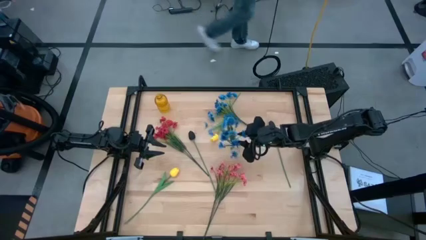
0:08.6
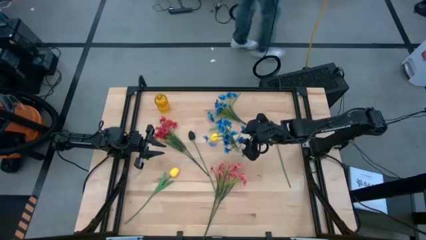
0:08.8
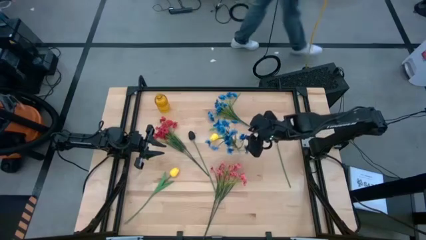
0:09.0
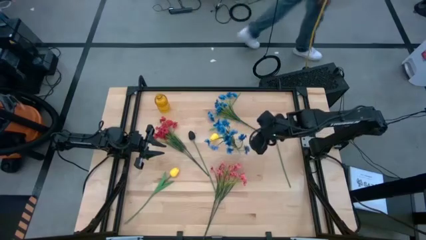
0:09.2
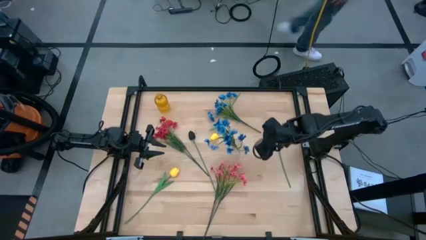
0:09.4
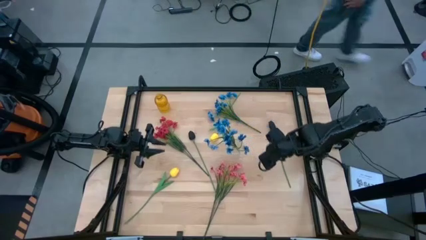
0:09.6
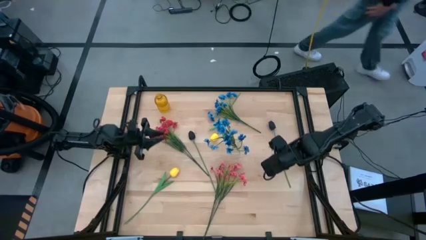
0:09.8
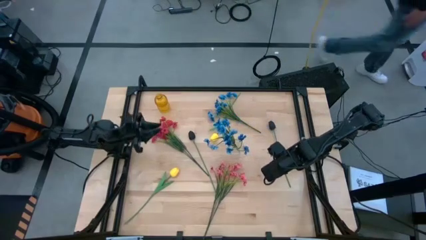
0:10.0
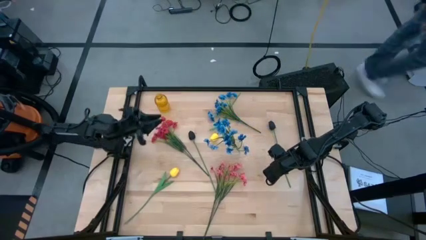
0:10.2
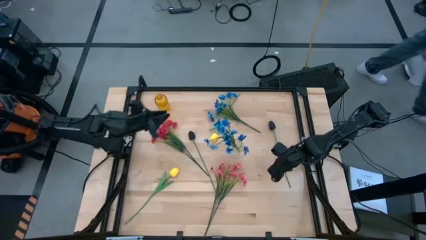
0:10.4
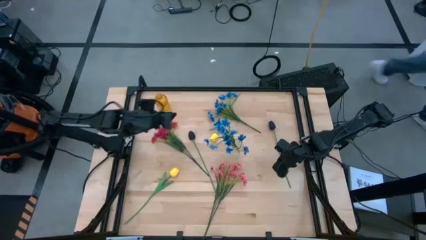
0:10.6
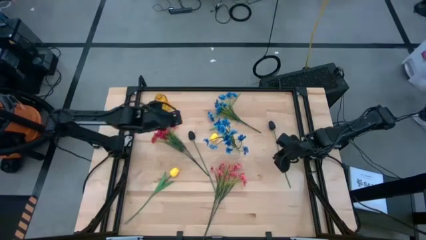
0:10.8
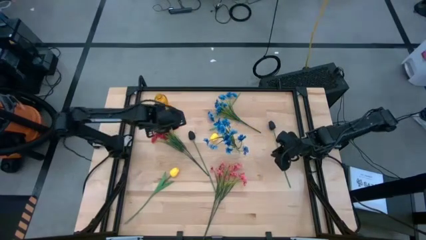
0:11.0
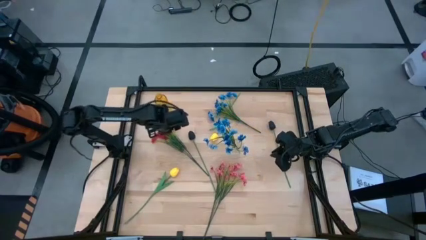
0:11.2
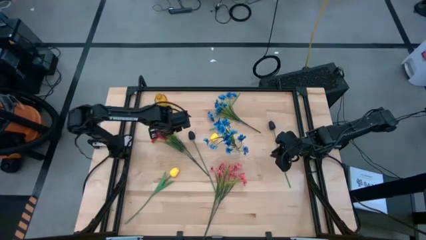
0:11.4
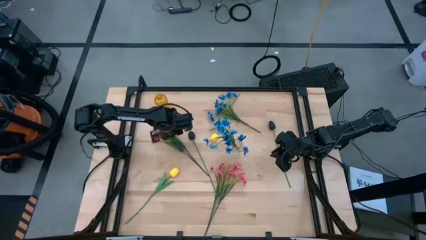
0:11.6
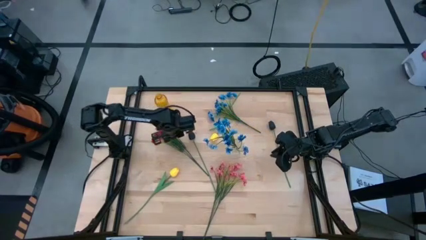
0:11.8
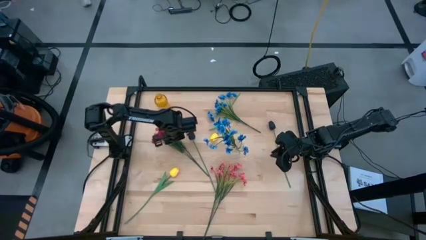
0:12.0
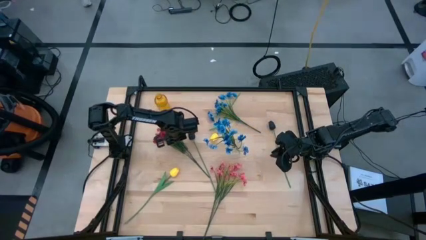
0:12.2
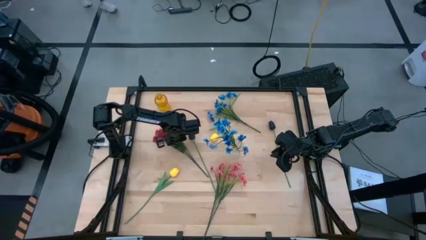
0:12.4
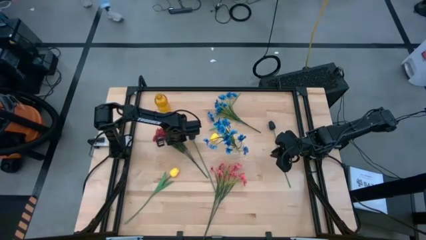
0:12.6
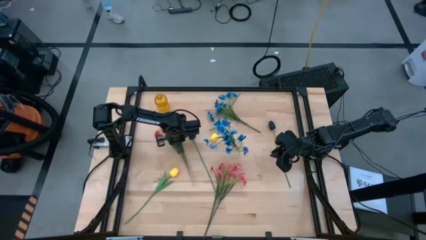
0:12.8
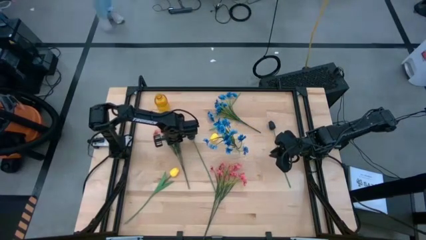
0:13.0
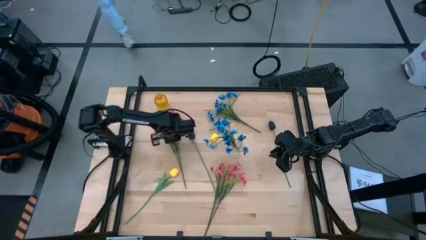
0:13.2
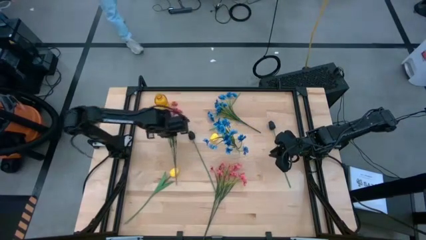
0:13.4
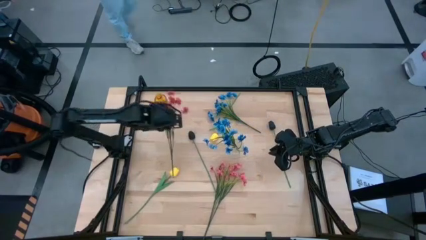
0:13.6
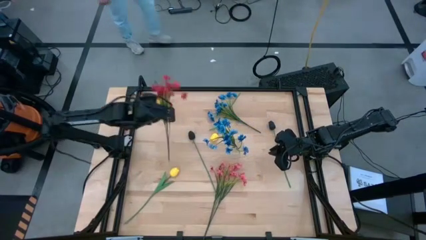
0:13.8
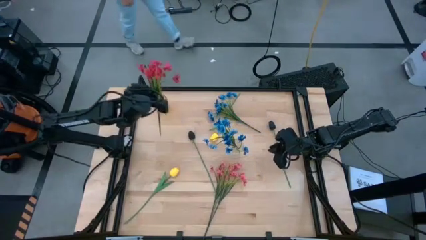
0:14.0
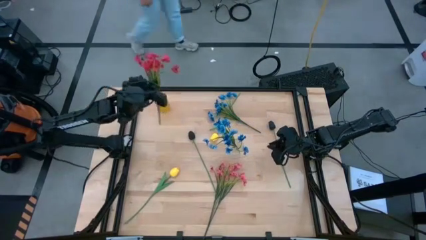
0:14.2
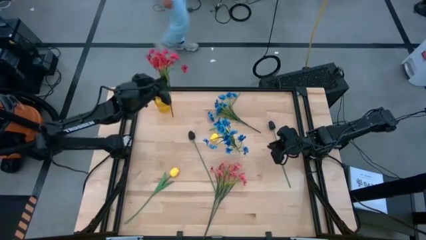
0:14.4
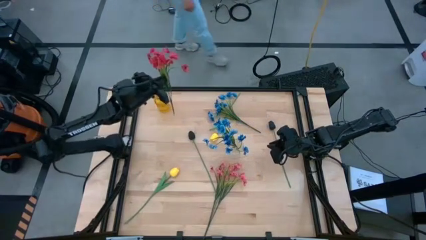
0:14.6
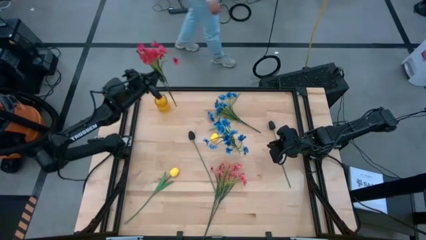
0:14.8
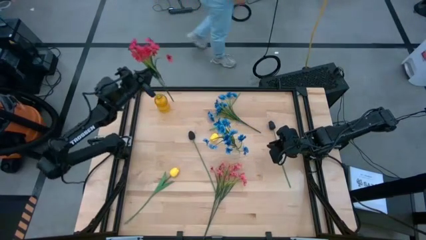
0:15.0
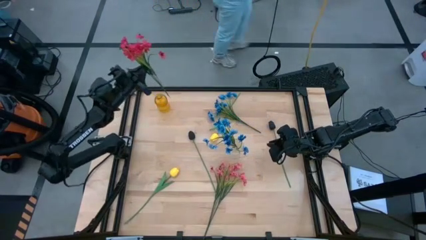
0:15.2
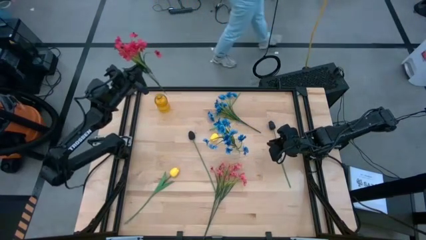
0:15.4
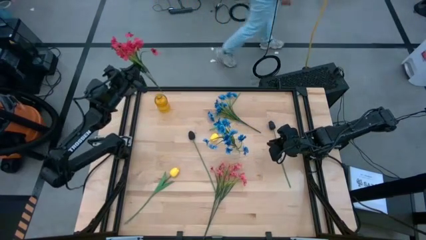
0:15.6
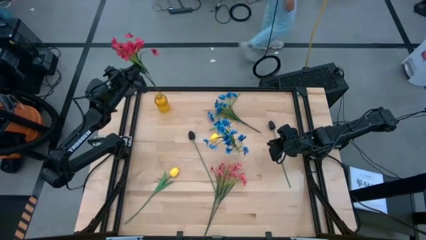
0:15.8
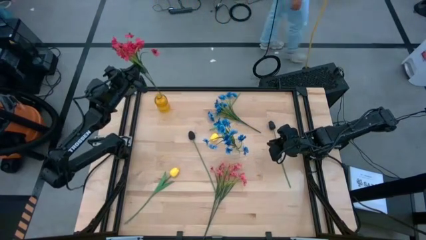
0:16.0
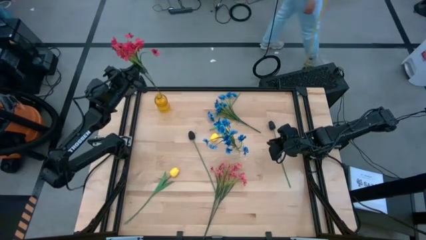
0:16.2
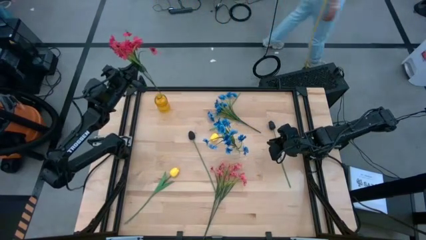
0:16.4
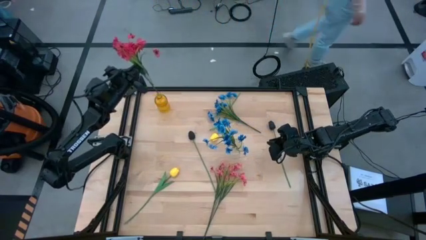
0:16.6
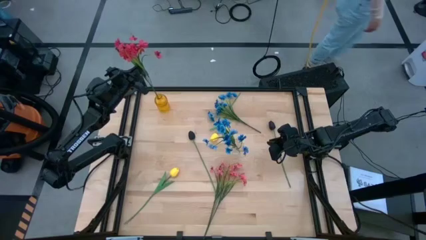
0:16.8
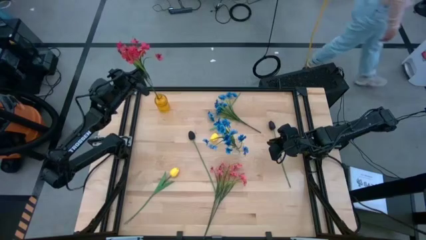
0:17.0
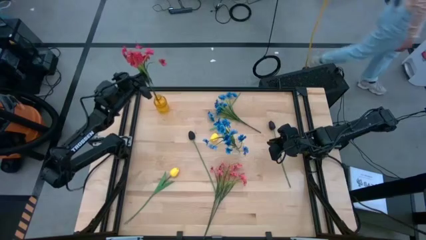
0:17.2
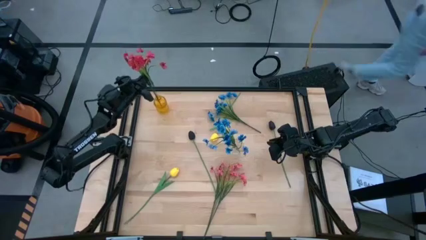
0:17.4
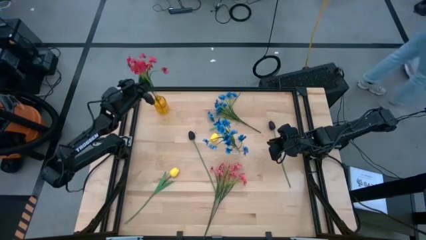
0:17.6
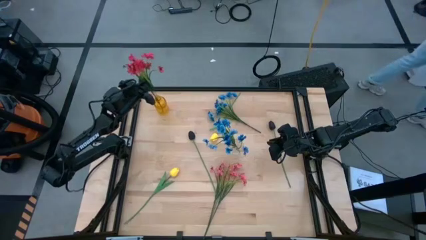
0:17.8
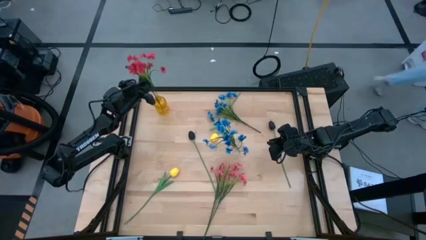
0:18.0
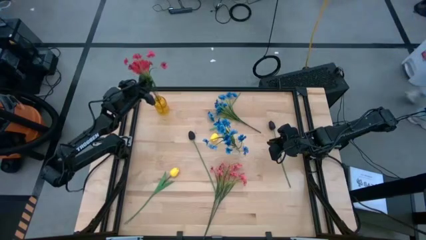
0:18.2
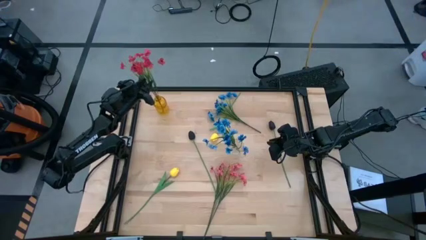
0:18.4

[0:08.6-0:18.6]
Task: Sort flowers into vase by color
Put the red flowers into the yellow vase

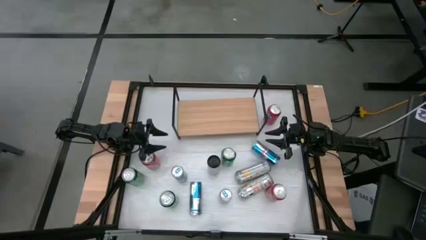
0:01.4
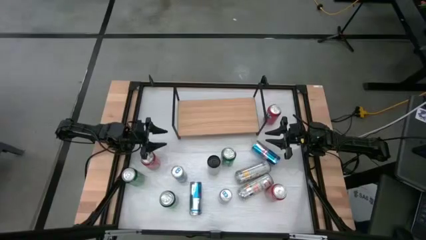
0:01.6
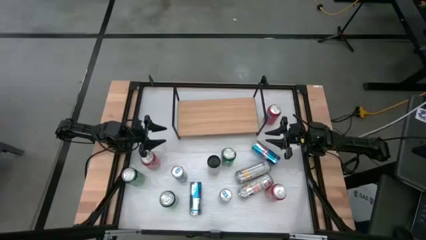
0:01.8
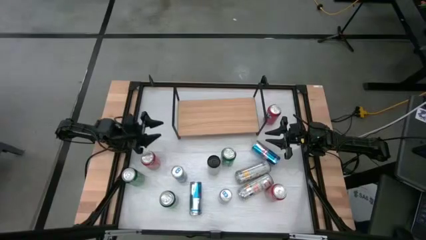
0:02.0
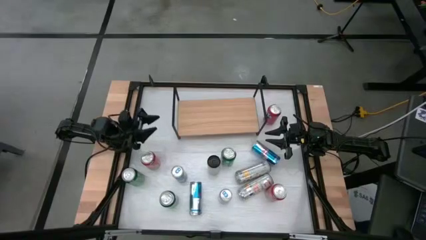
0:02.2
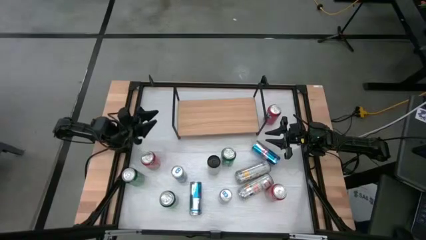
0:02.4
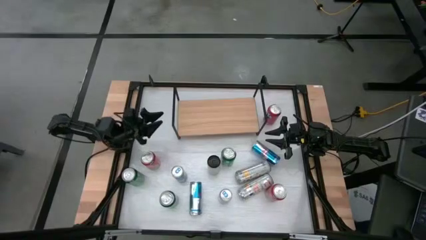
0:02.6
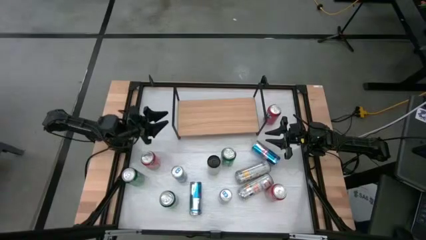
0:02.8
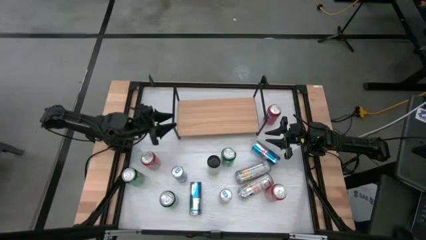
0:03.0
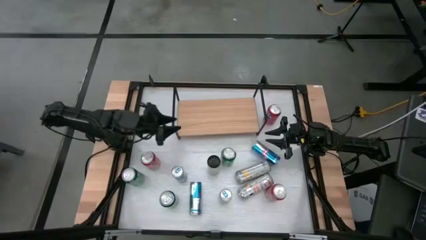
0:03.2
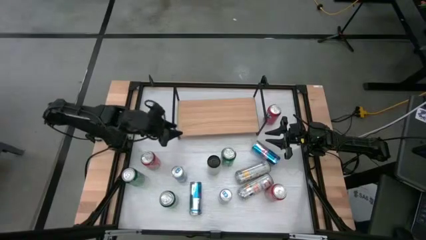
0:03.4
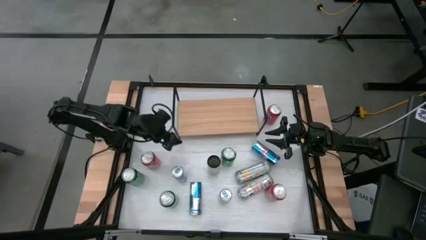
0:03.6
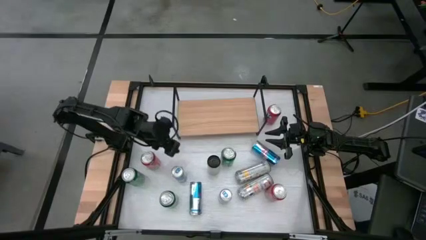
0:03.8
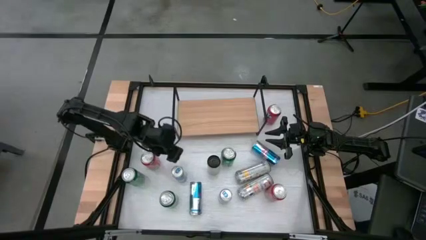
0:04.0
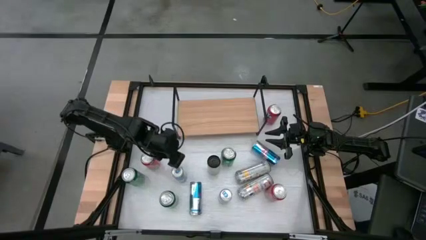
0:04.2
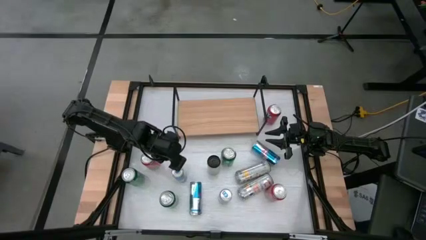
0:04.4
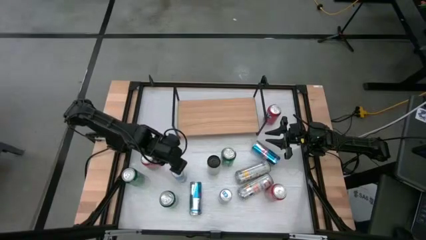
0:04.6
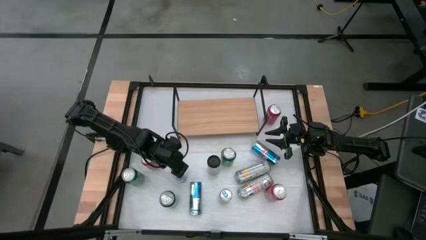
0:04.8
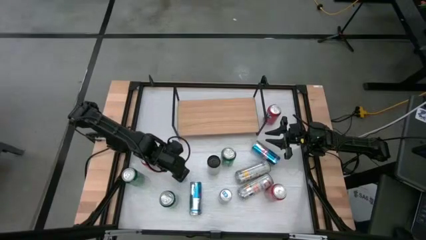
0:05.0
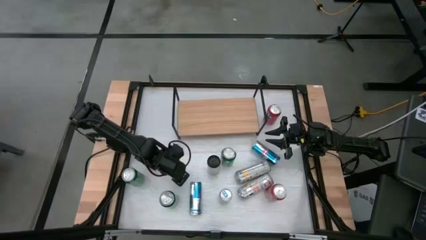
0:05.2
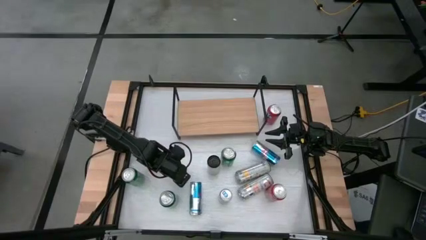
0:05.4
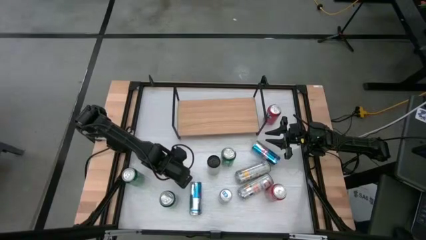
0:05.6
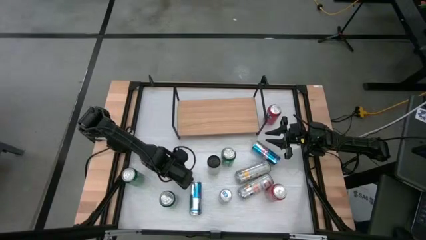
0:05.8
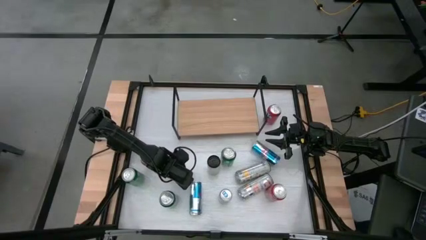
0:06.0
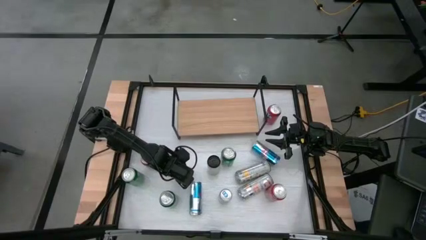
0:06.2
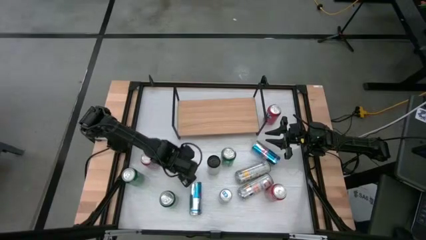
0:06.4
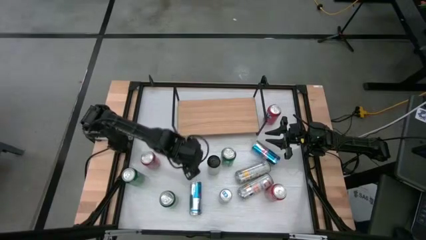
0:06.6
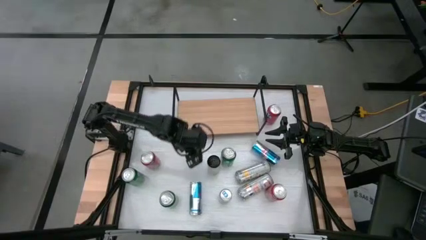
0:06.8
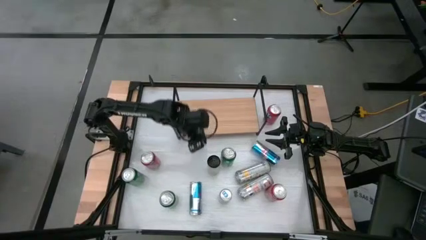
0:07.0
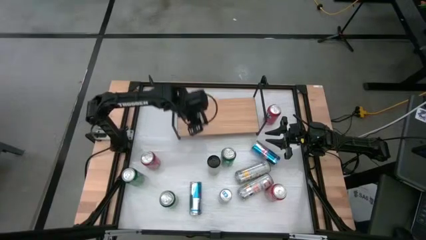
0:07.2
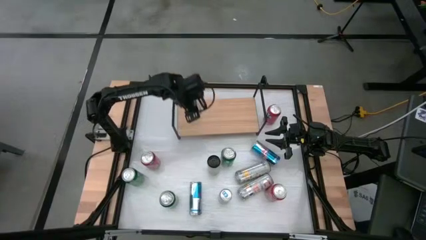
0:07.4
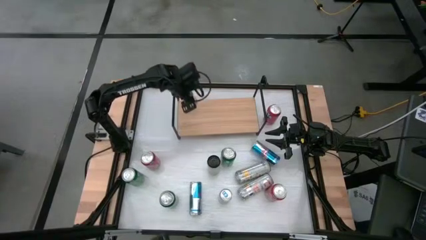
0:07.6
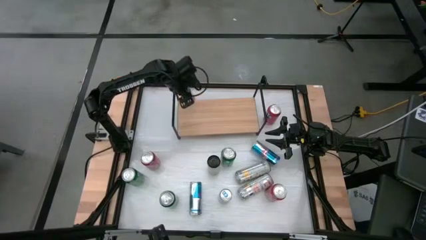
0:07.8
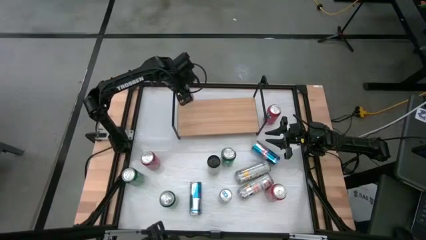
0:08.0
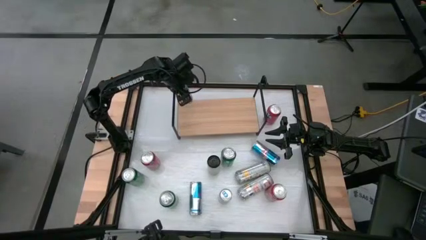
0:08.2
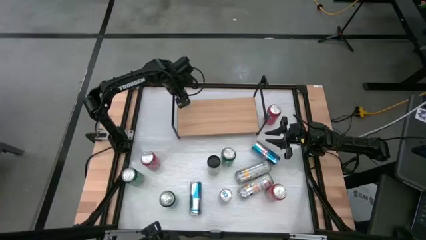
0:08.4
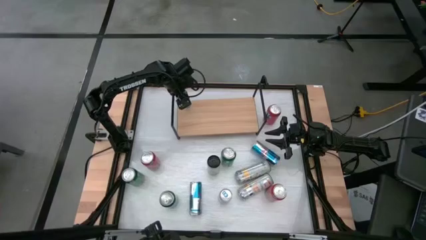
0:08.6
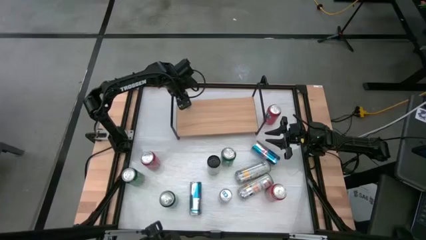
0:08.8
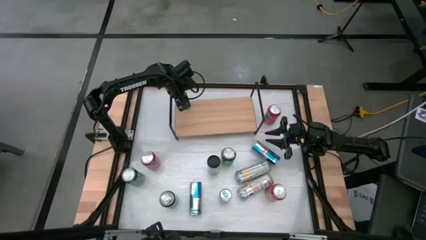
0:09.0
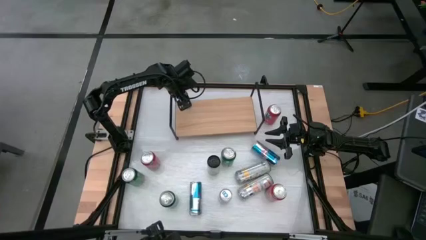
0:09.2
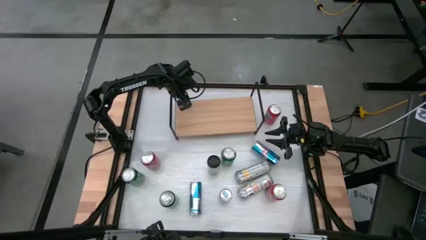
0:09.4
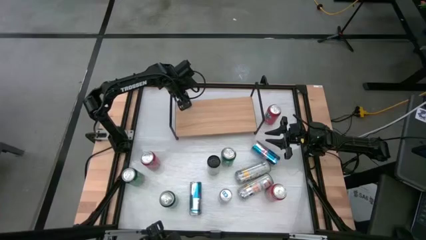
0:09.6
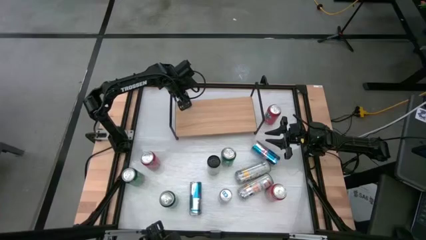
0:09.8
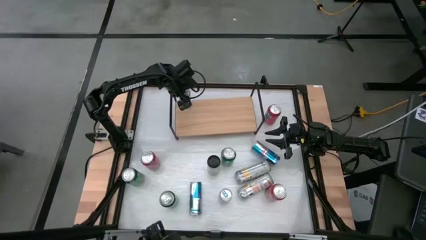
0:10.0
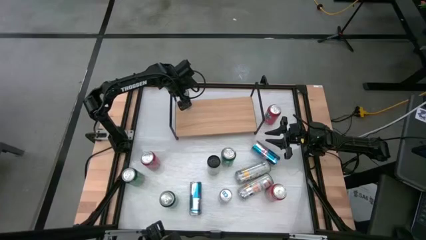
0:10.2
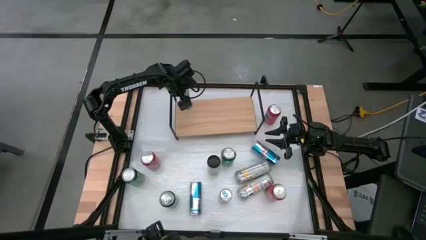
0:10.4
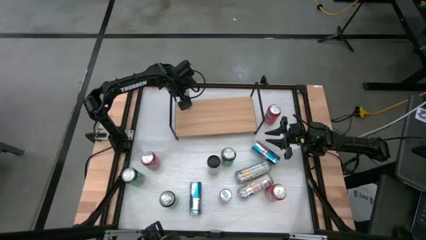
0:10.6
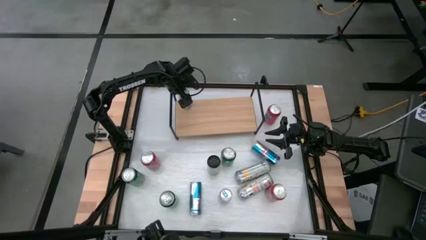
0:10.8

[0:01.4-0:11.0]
Task: Sort soda cans
Put the blue soda can on the shelf
